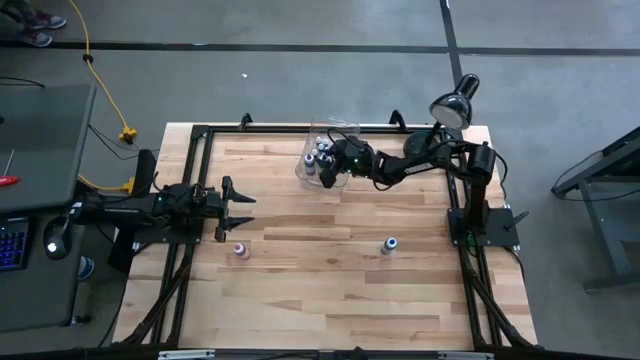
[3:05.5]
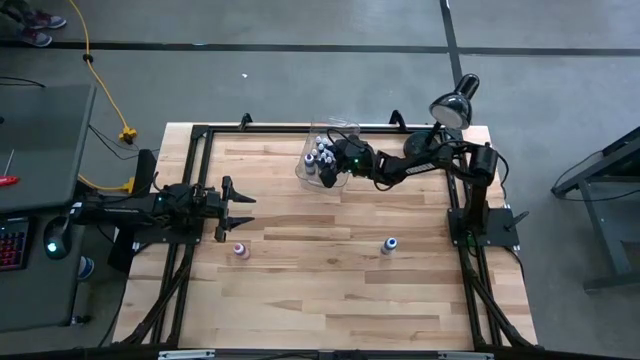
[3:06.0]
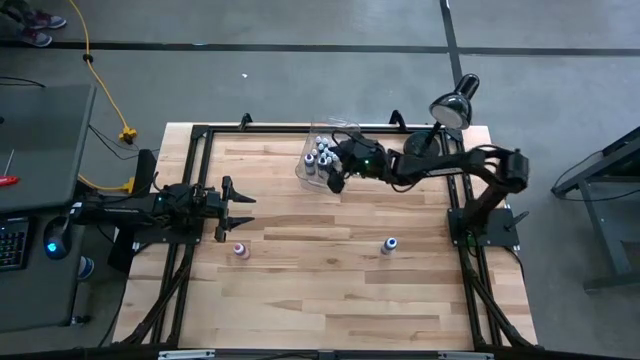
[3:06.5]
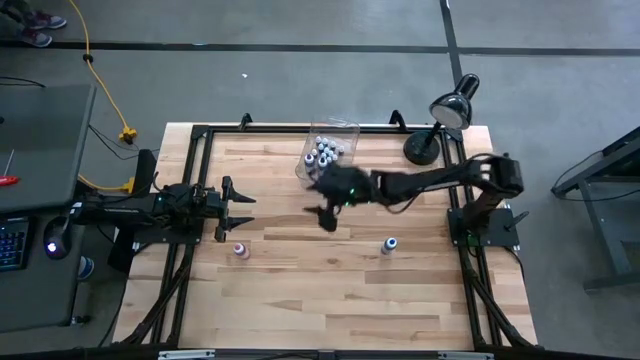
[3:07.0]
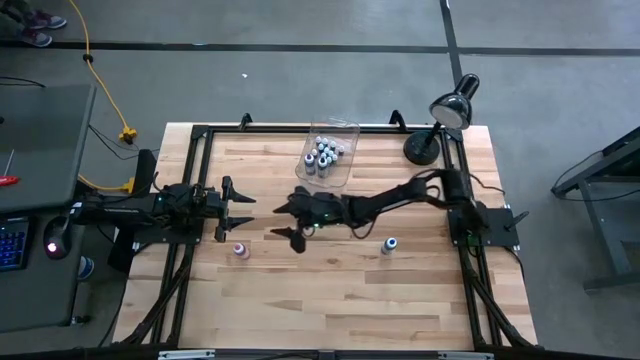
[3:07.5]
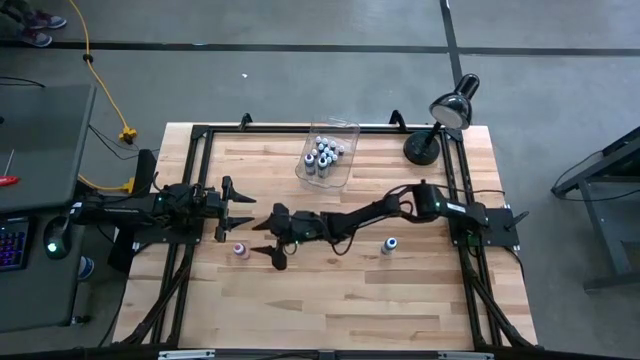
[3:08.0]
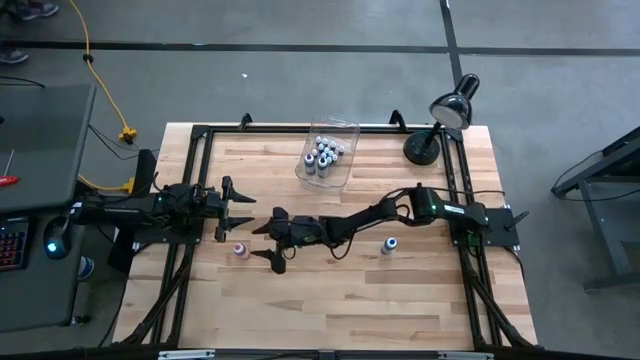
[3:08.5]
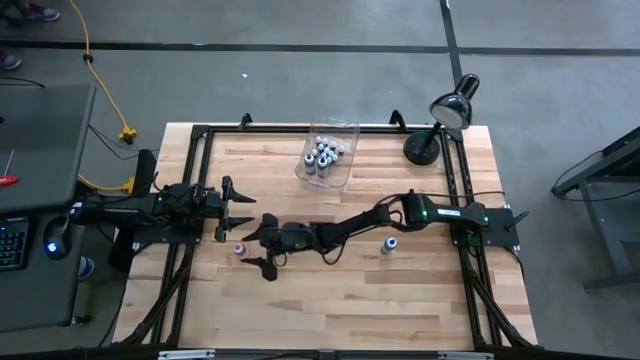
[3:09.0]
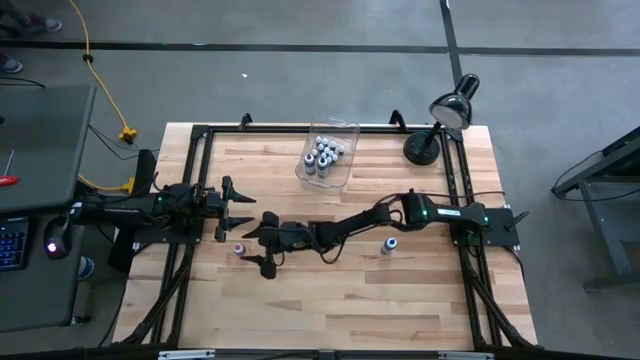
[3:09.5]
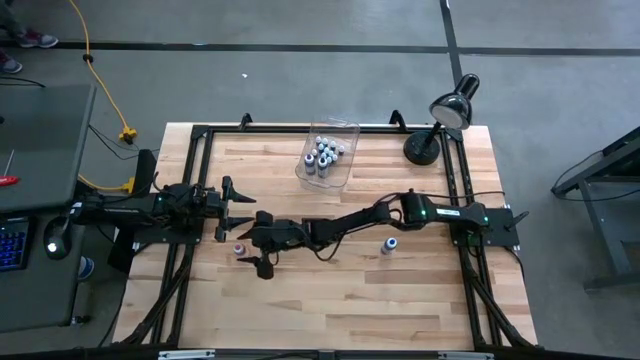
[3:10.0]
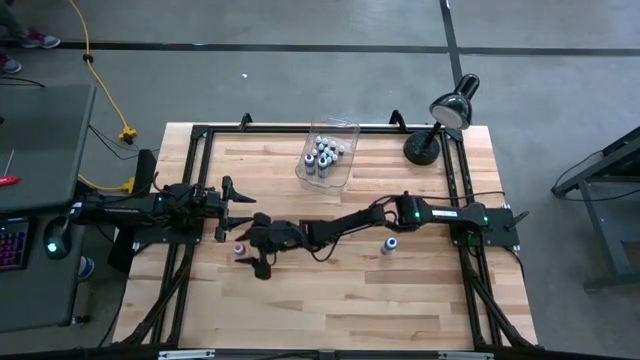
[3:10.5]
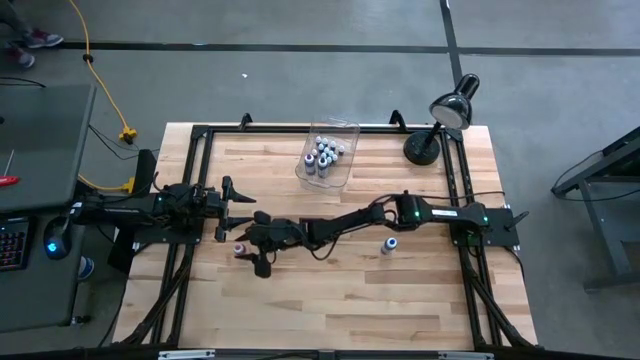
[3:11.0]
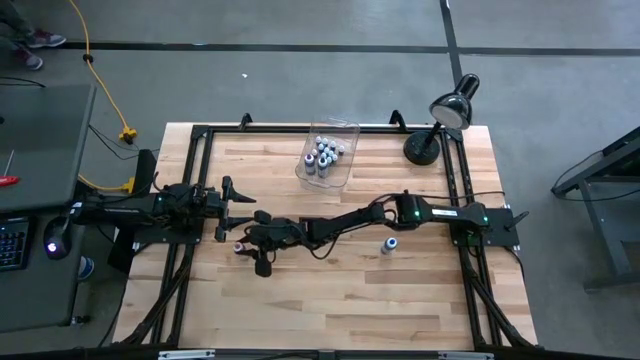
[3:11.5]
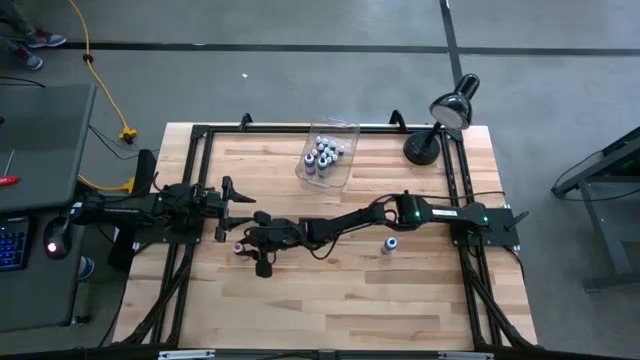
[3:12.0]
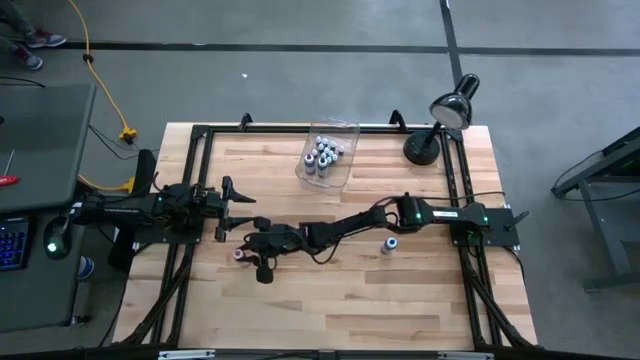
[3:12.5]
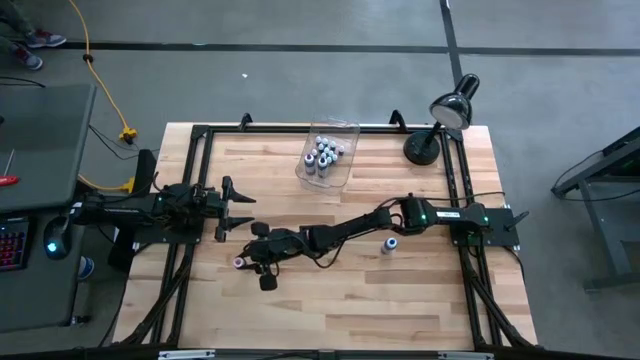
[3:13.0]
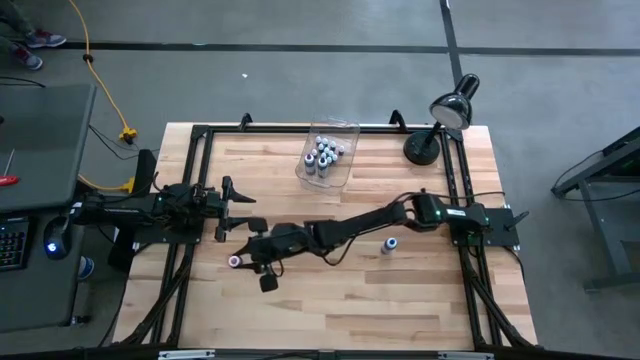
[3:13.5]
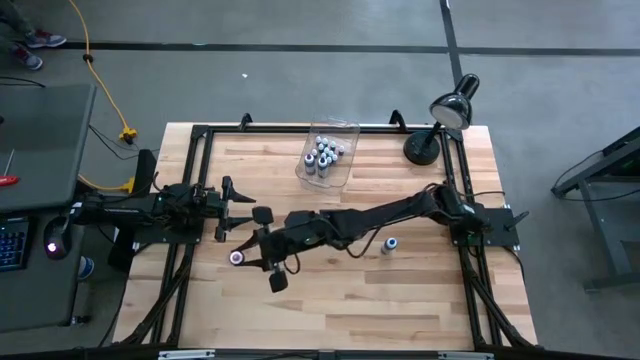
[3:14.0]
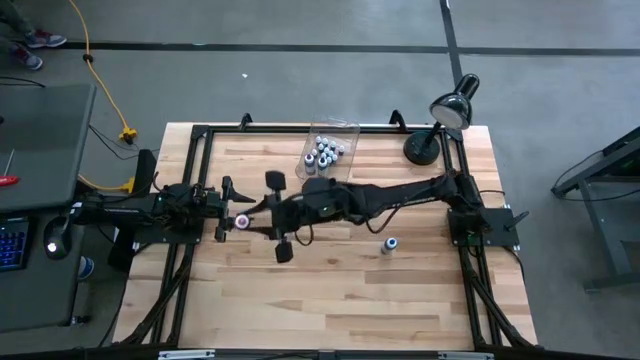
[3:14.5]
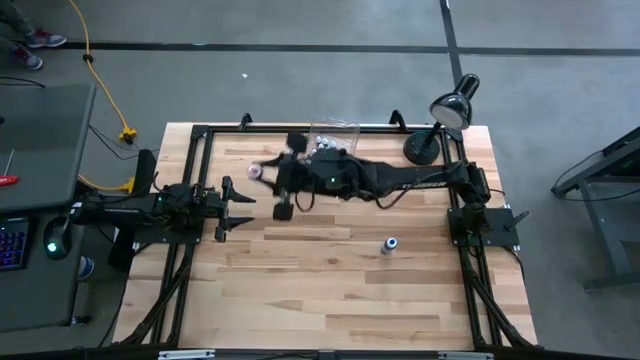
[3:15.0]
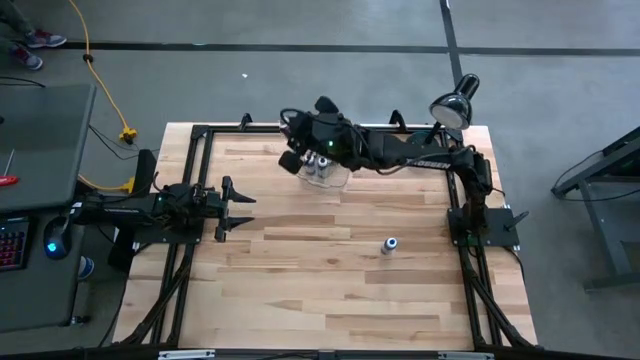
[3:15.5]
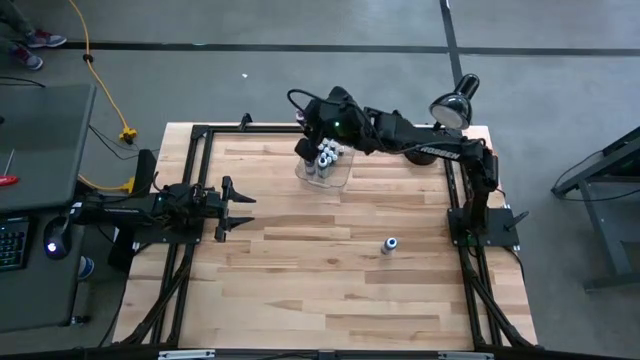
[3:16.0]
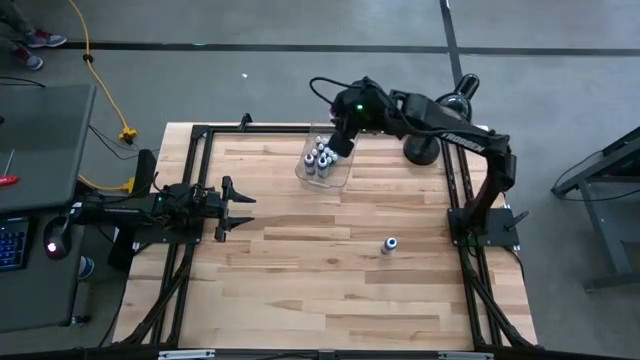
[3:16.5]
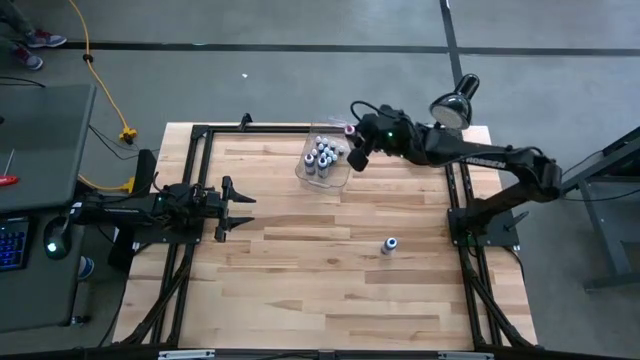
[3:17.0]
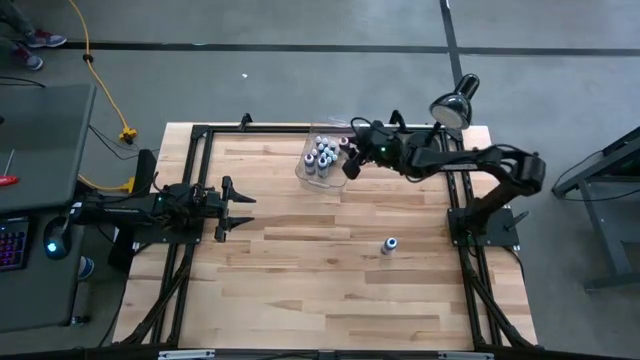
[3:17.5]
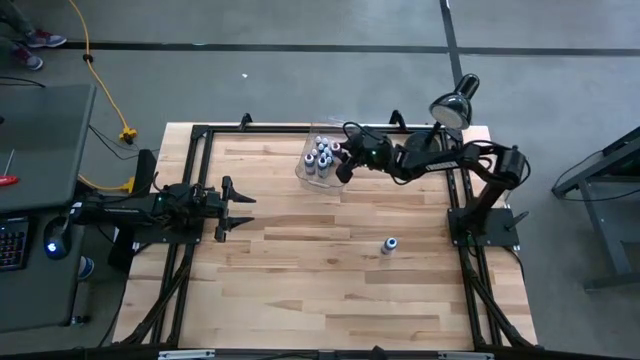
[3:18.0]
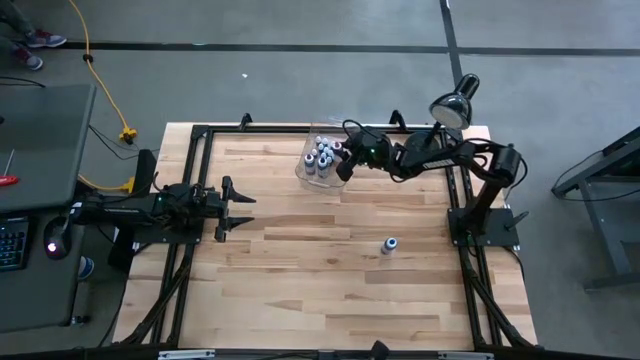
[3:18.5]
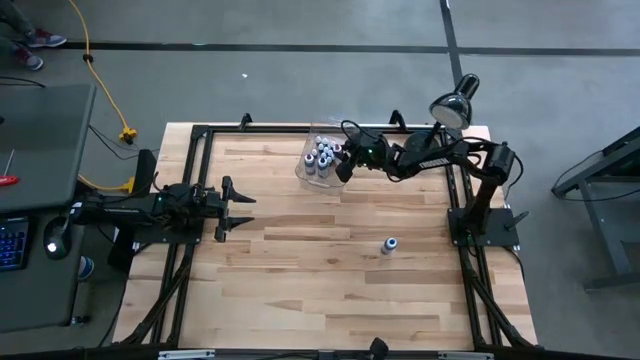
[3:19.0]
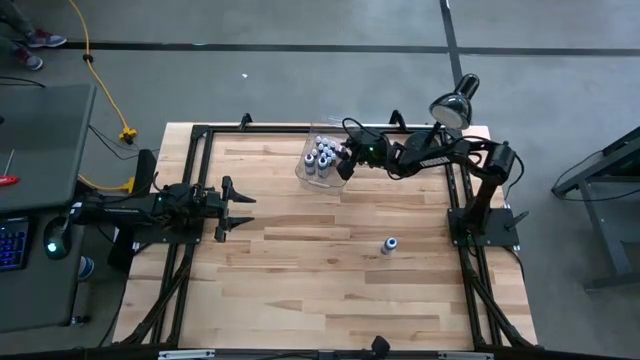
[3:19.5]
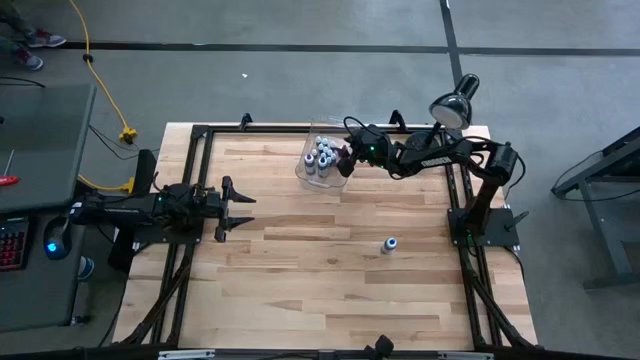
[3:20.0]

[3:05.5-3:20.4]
Task: Pick & Place food coloring
Put the big pink food coloring bottle into the transparent bin

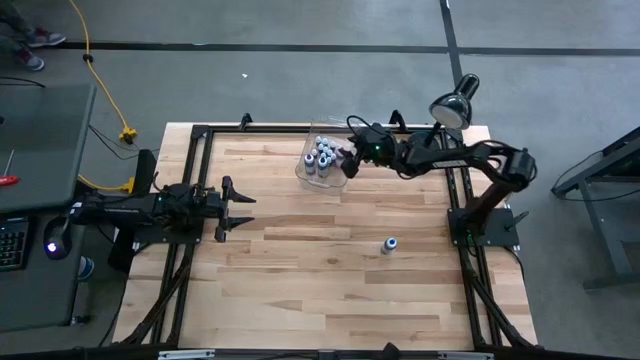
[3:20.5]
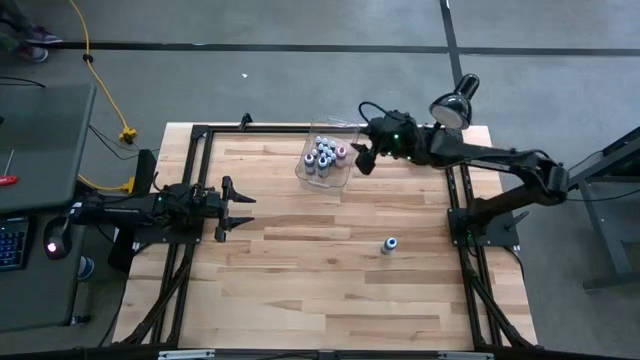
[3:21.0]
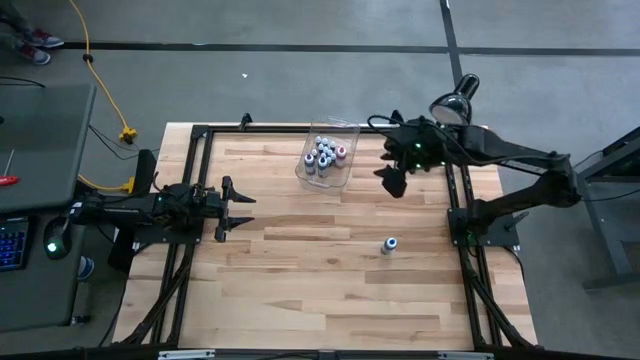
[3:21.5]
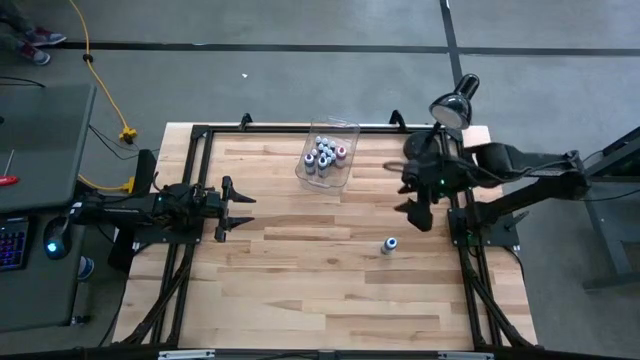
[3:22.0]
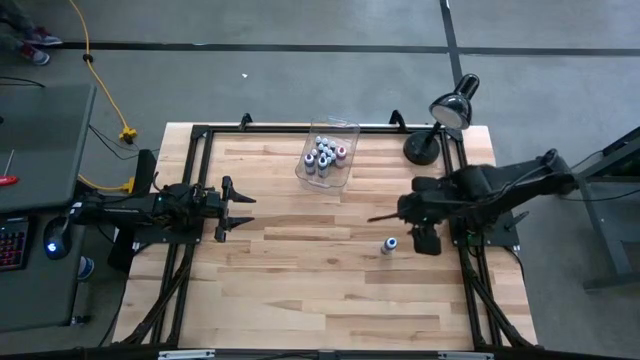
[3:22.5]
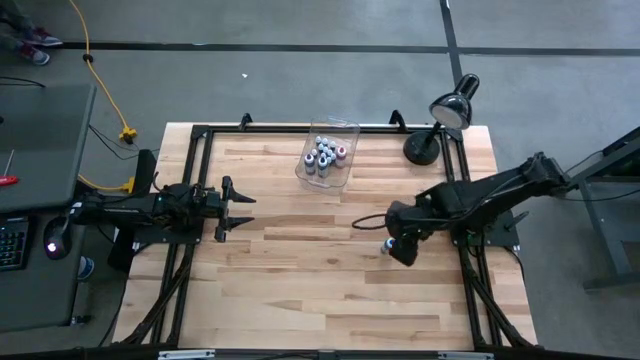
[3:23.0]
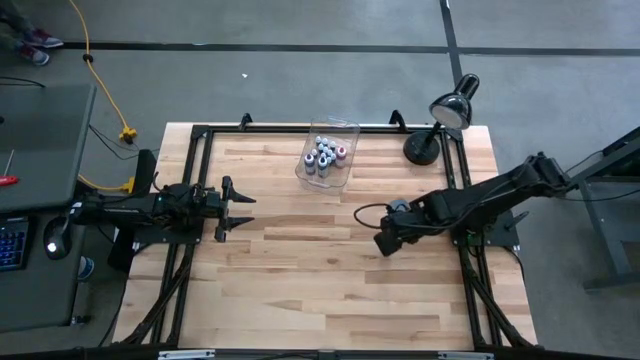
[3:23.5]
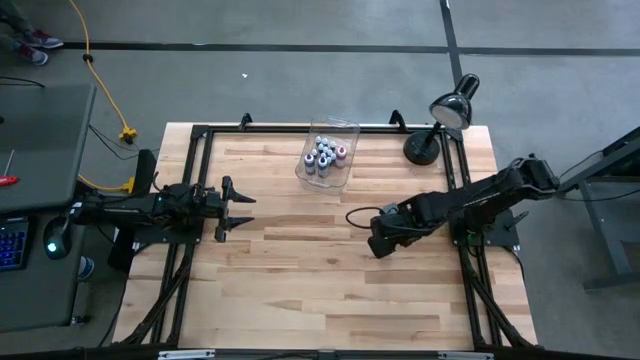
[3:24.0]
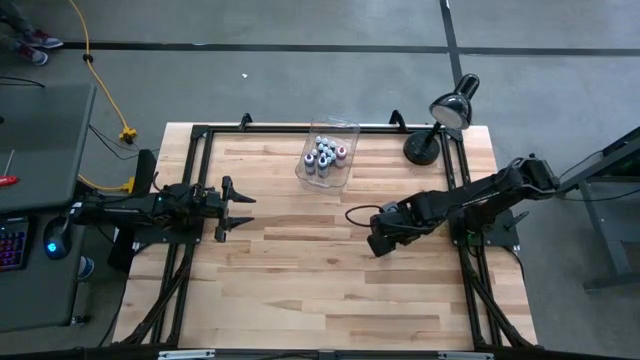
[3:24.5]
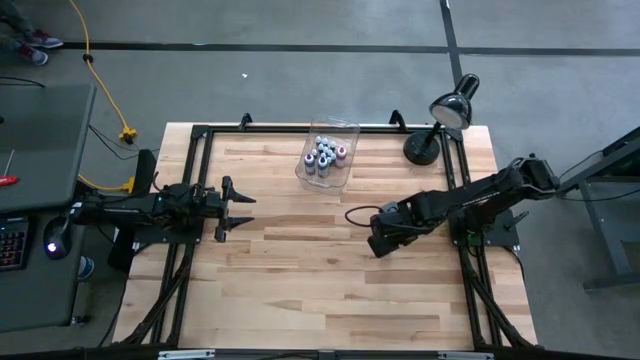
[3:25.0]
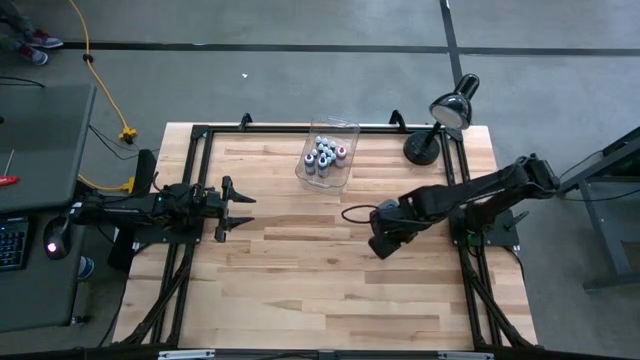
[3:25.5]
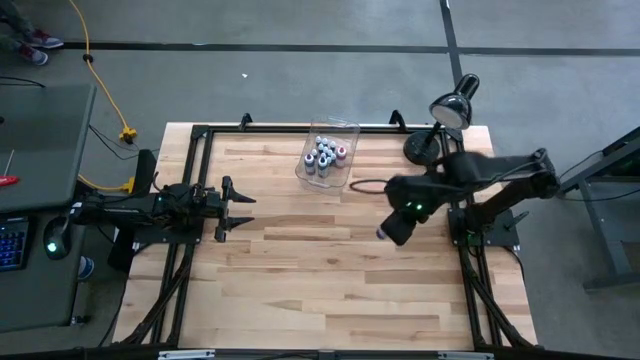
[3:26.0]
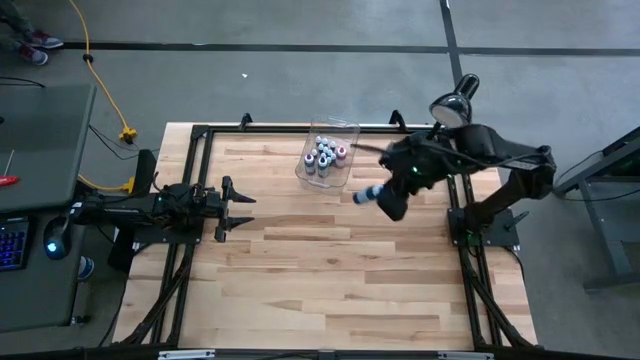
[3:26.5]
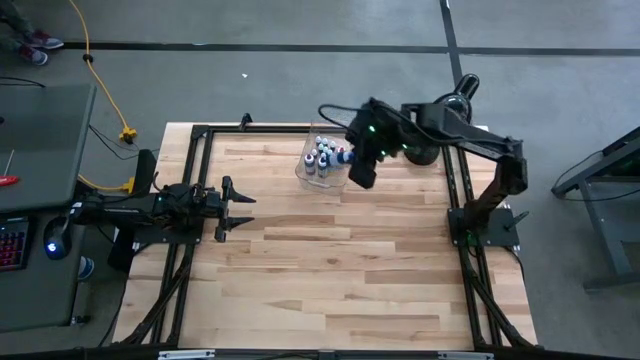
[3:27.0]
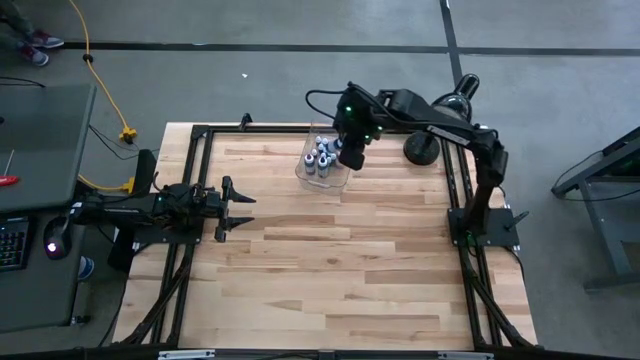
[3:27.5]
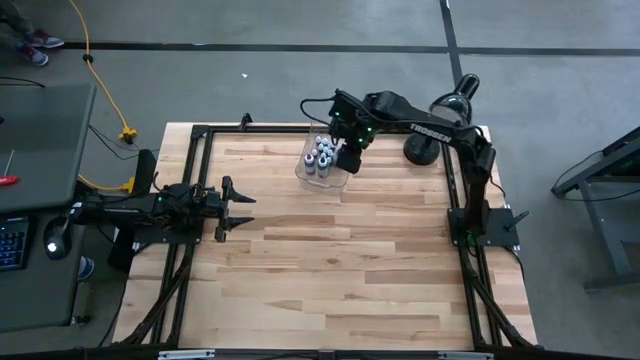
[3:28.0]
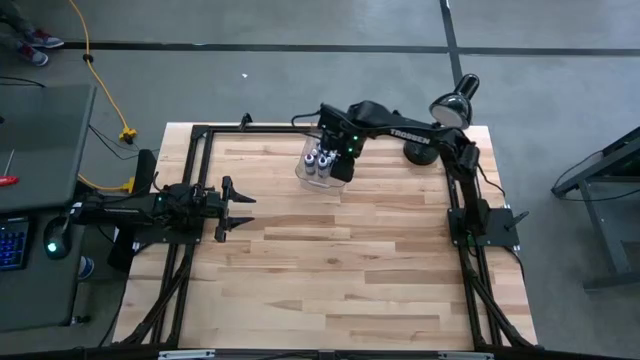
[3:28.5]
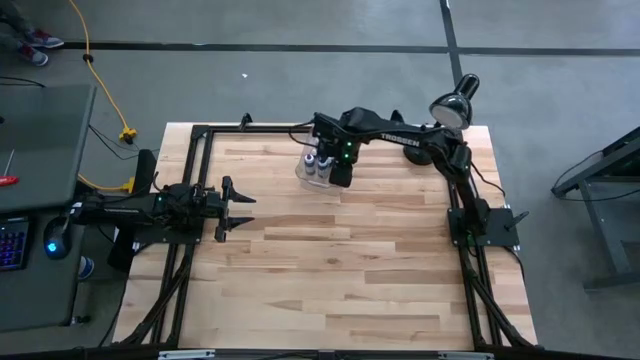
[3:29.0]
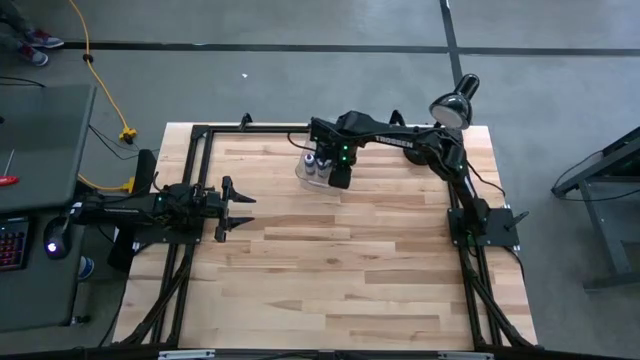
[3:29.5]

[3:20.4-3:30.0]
Put the big blue food coloring bottle into the transparent bin
